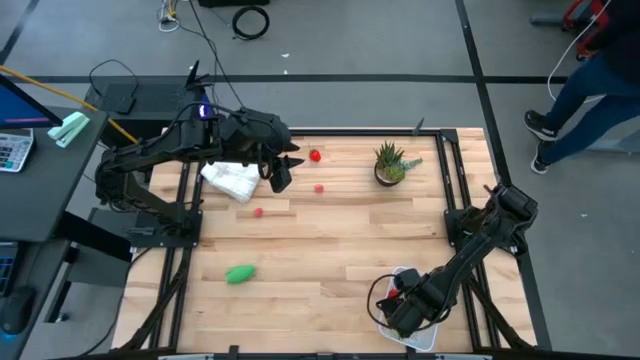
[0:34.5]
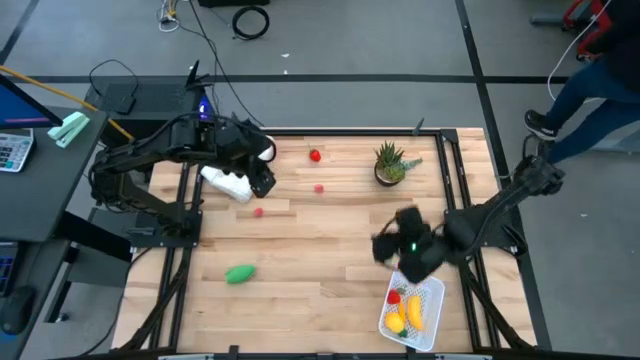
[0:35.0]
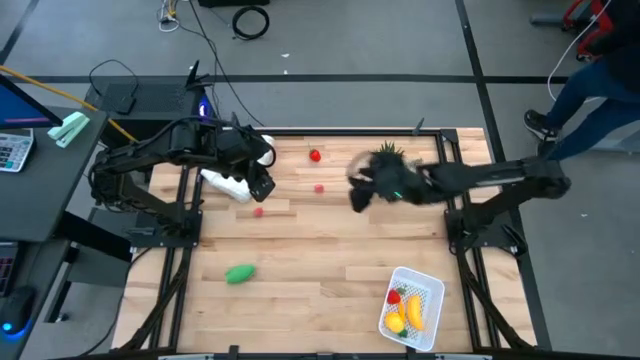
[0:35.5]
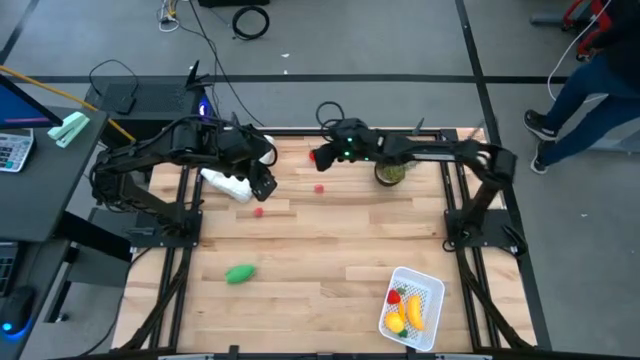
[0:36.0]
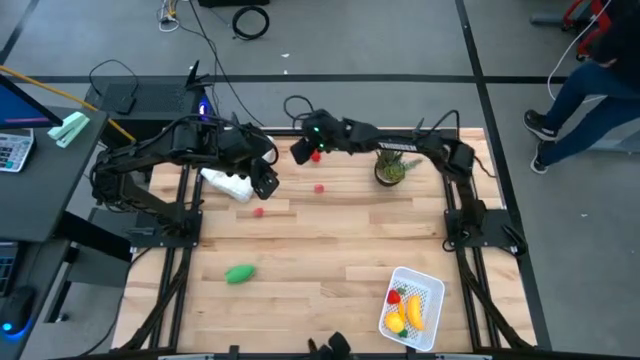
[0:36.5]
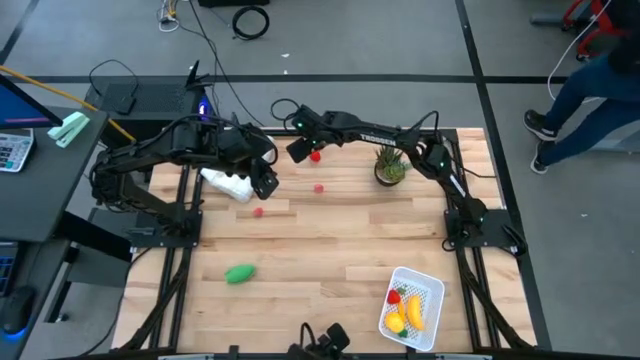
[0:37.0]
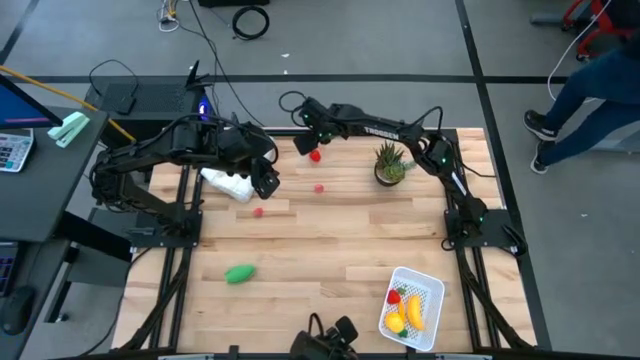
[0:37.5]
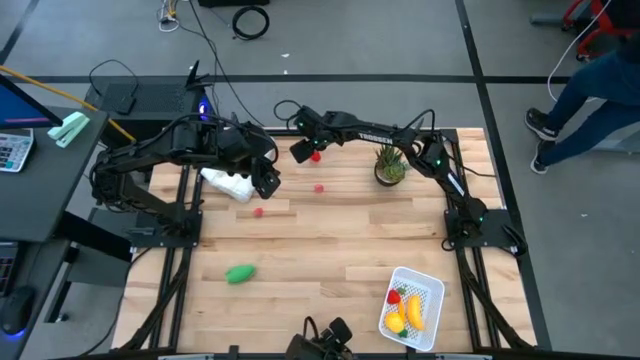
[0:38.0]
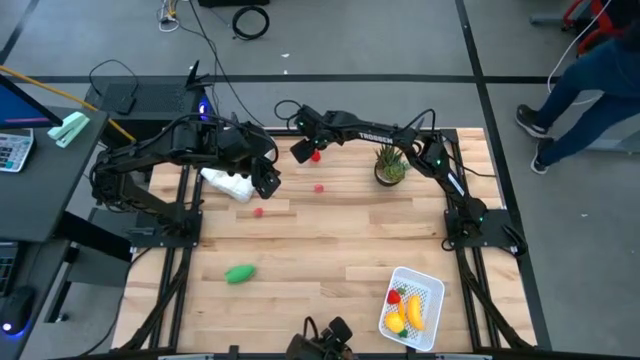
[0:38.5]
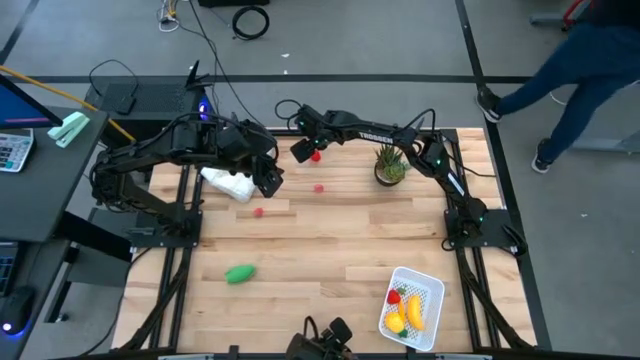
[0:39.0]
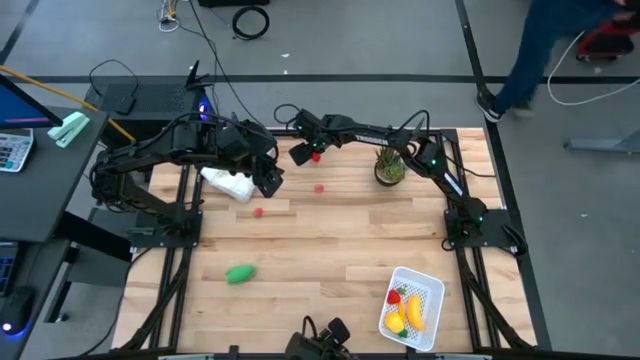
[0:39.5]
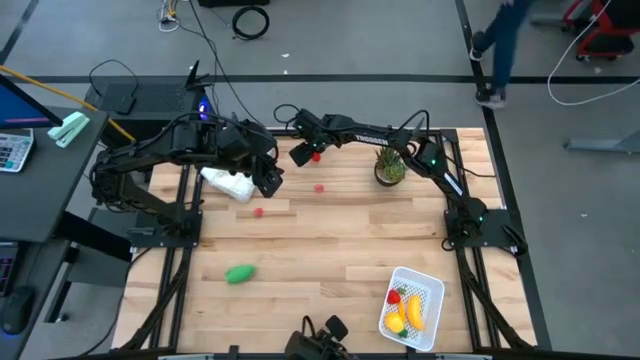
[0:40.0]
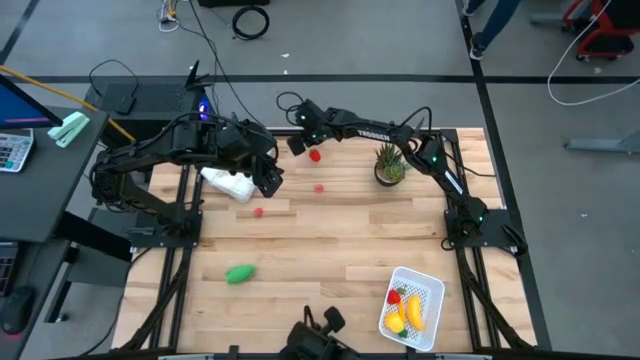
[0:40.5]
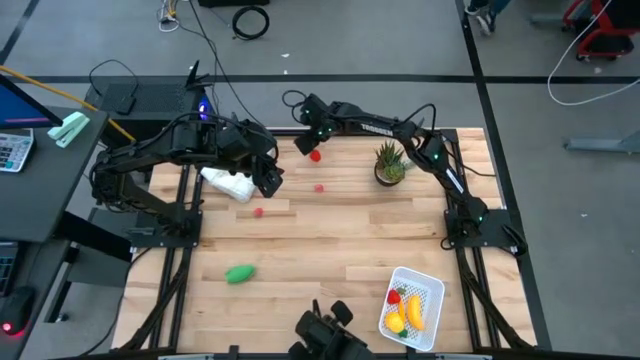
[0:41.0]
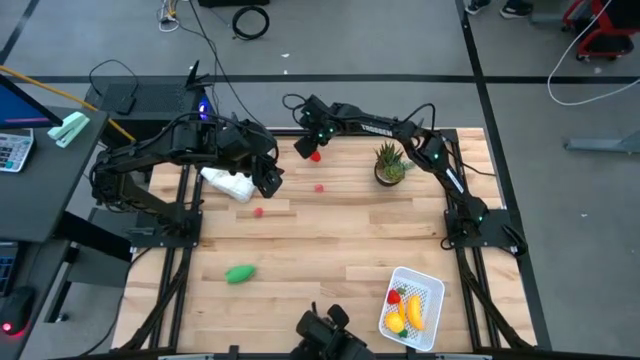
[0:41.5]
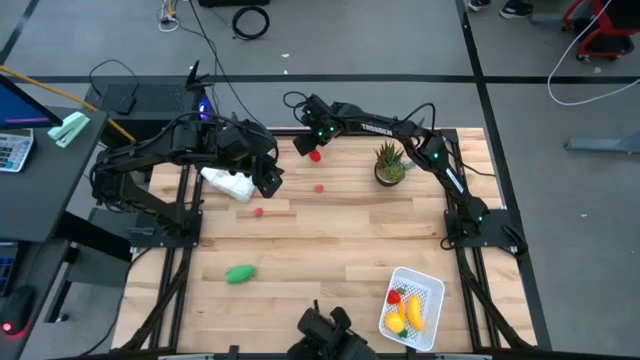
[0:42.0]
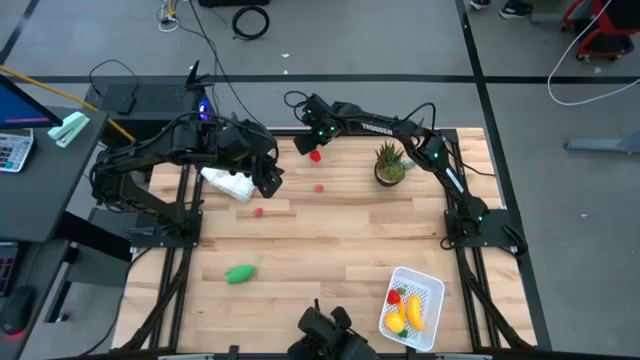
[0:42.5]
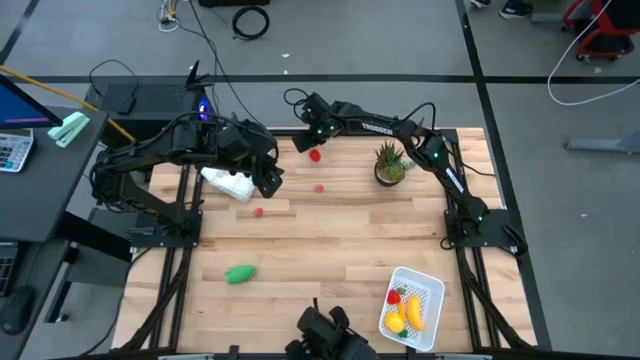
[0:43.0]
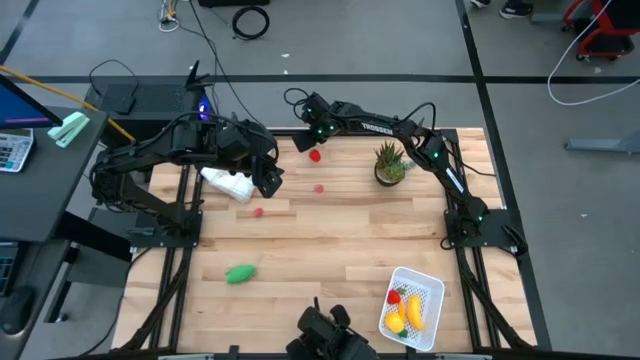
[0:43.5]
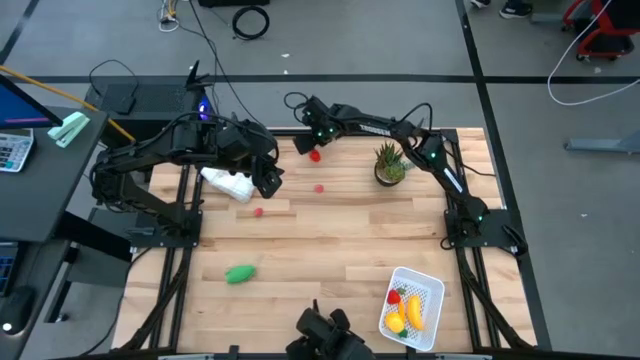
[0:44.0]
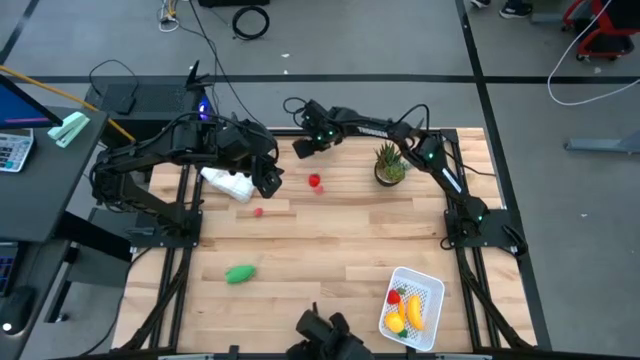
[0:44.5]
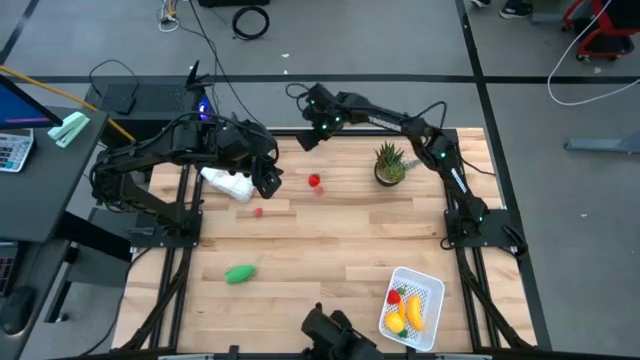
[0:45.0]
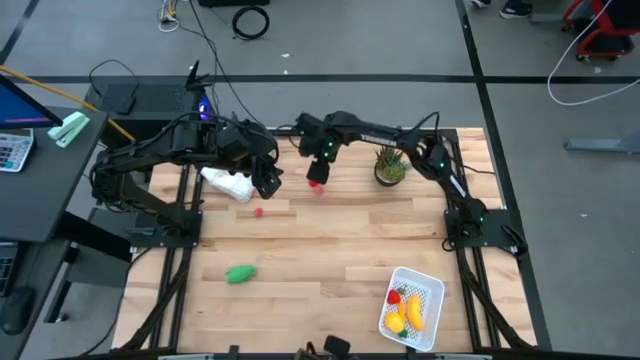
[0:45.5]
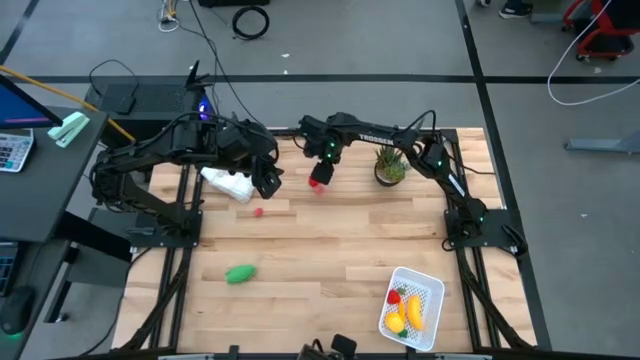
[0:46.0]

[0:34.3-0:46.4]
Task: Pick and placing Produce into tupperware
Put the strawberry into the white bin

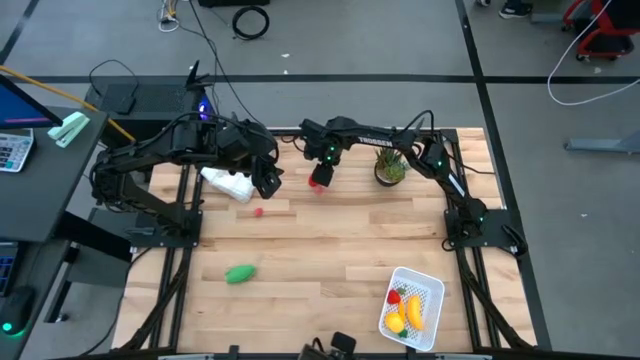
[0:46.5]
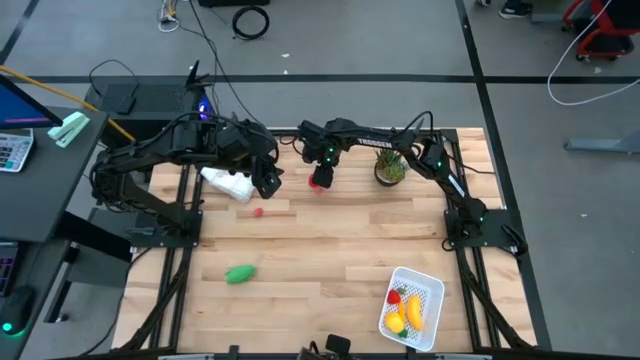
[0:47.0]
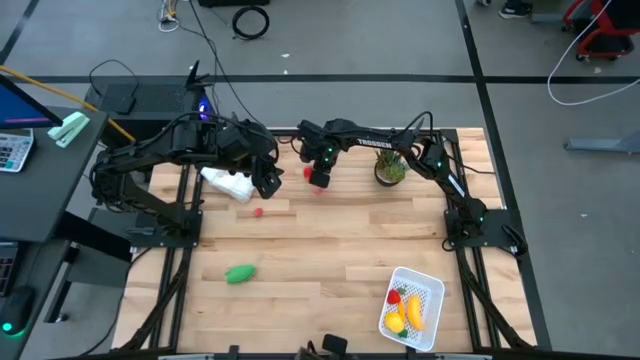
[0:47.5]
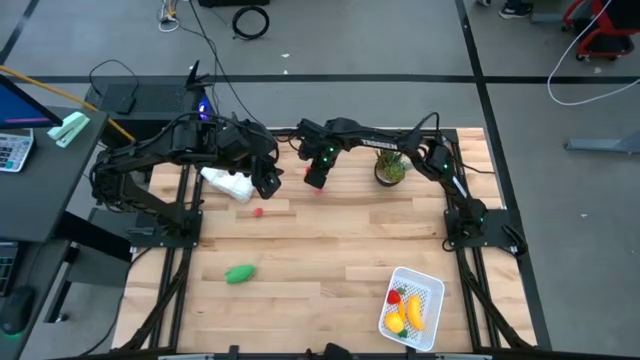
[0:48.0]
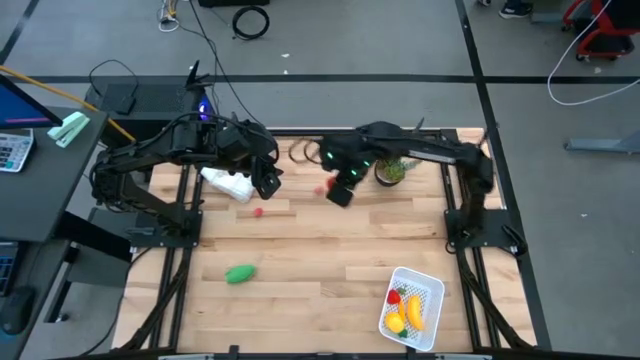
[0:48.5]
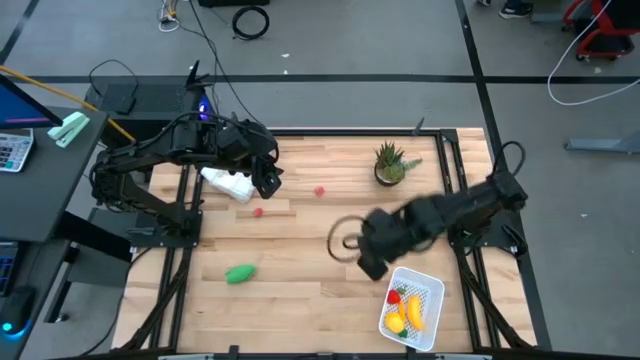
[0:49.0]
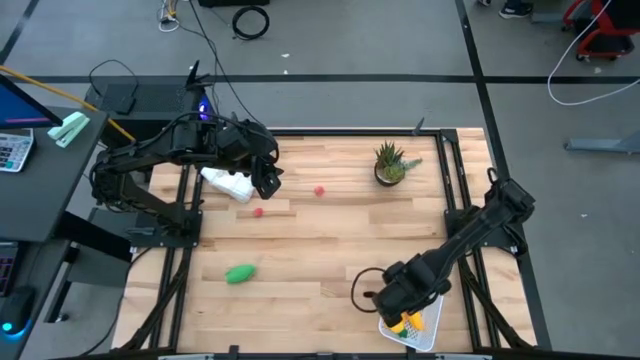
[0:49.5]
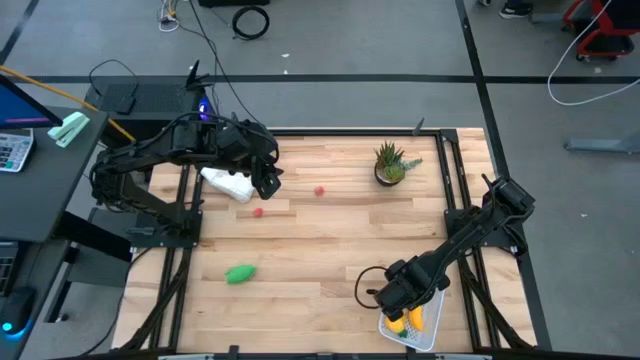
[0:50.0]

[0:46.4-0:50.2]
Put the strawberry into the white bin

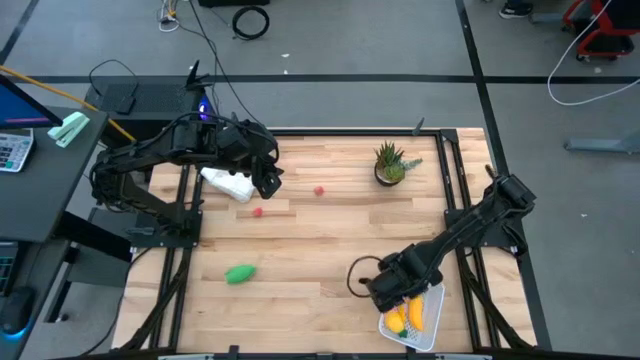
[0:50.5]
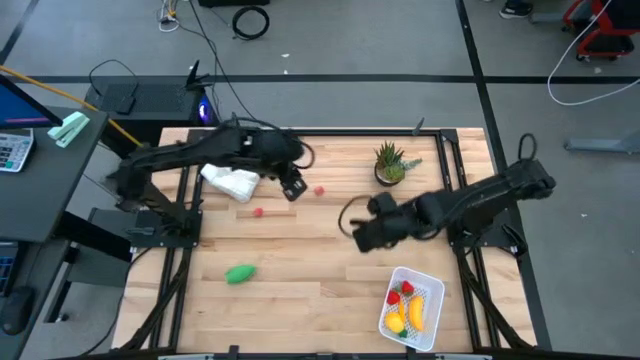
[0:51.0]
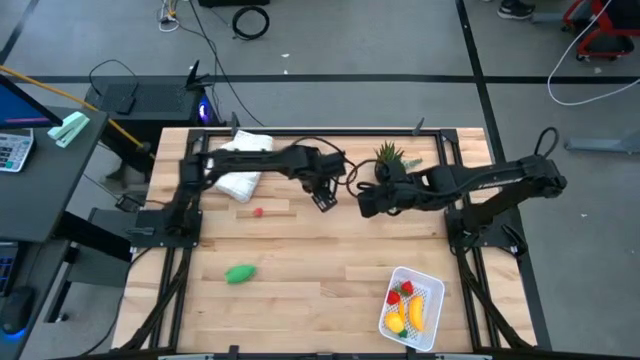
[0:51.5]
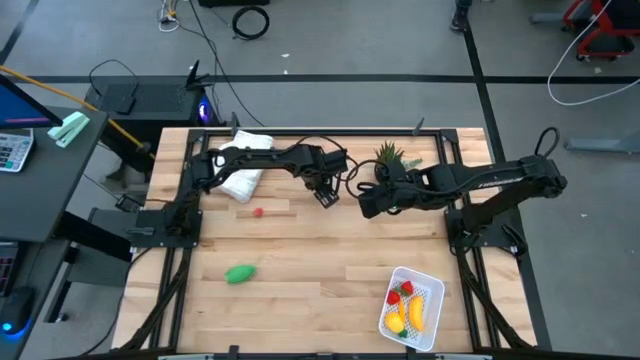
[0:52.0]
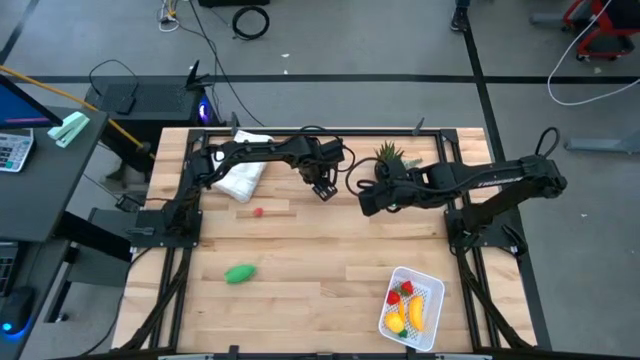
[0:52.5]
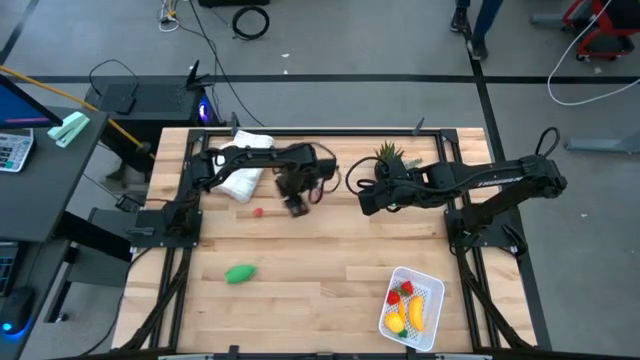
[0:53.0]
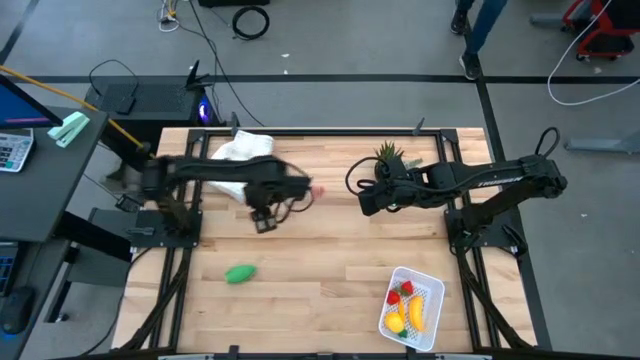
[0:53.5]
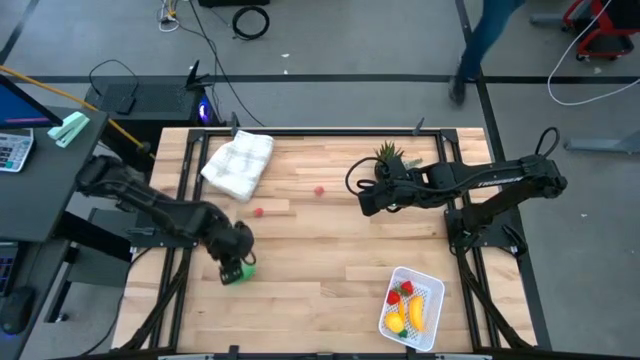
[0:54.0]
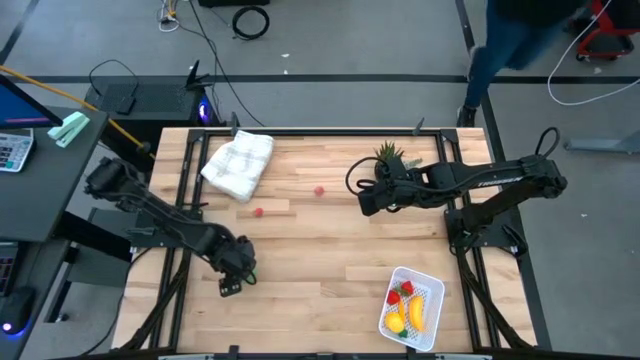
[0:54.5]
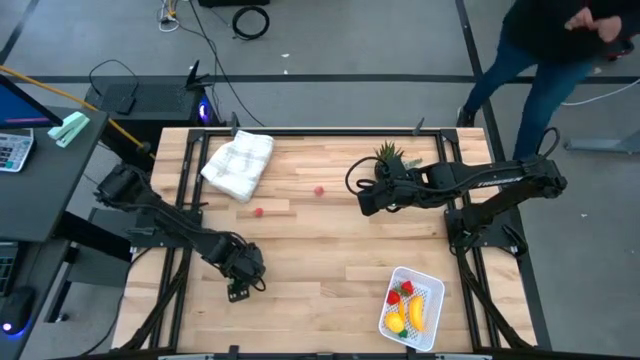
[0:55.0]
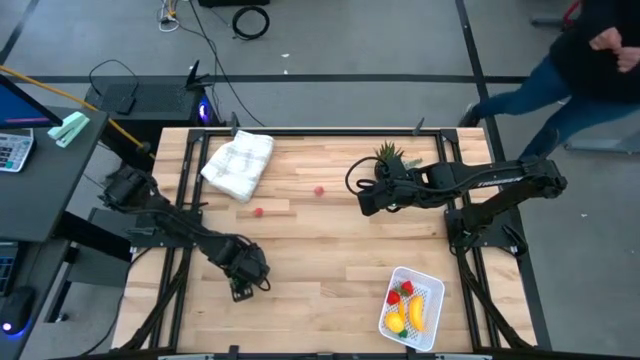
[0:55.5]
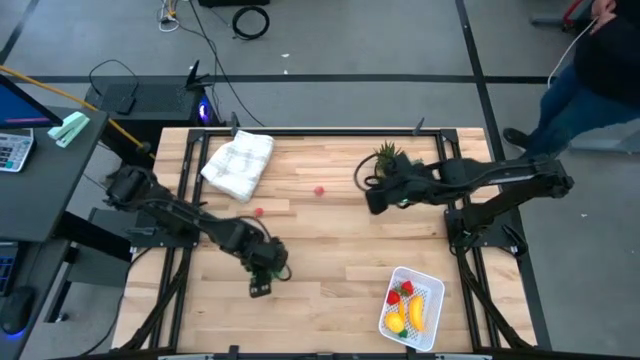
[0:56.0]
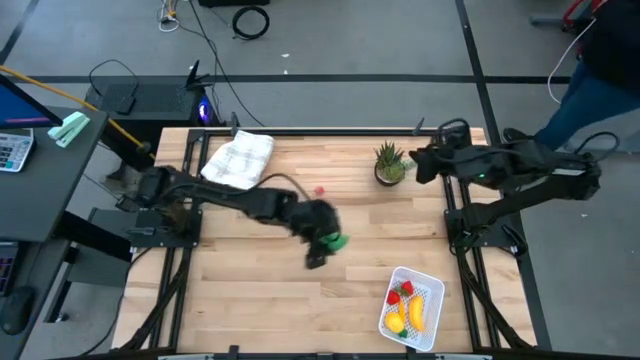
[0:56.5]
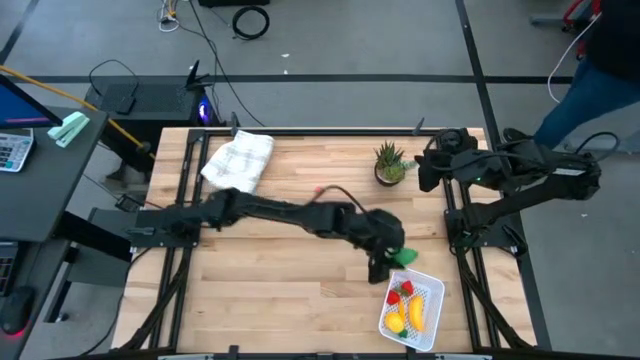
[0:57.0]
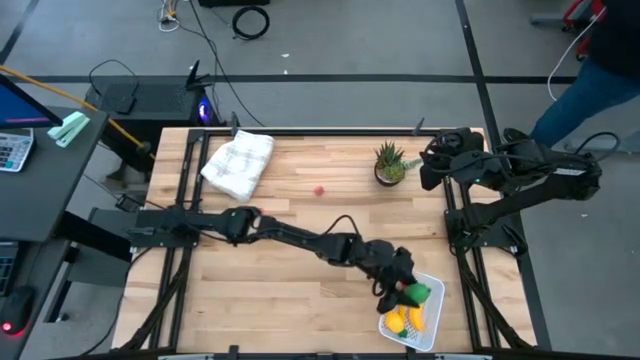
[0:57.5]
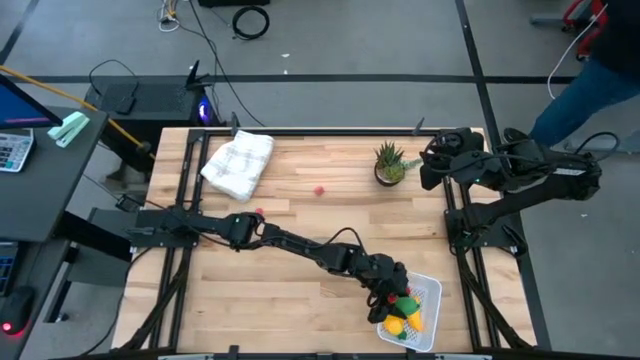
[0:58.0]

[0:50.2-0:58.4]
Put the corn into the white bin
